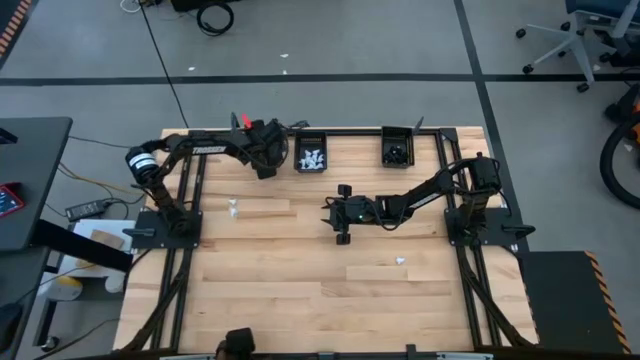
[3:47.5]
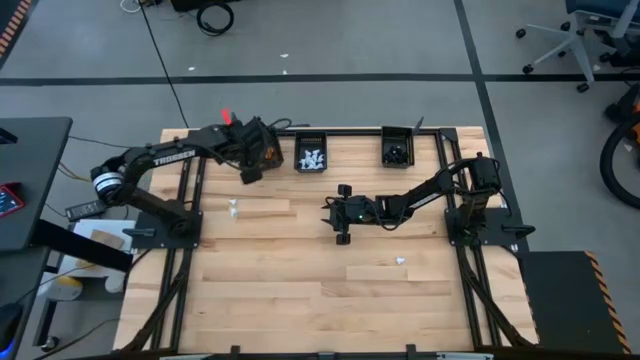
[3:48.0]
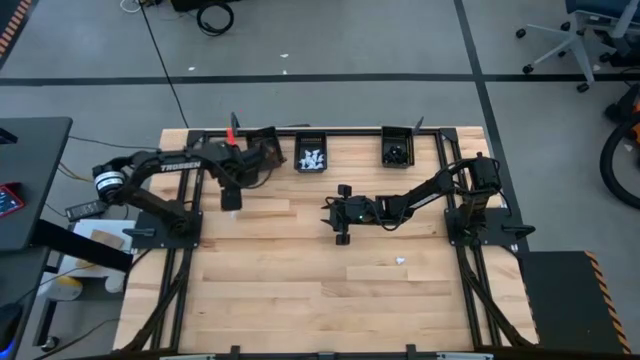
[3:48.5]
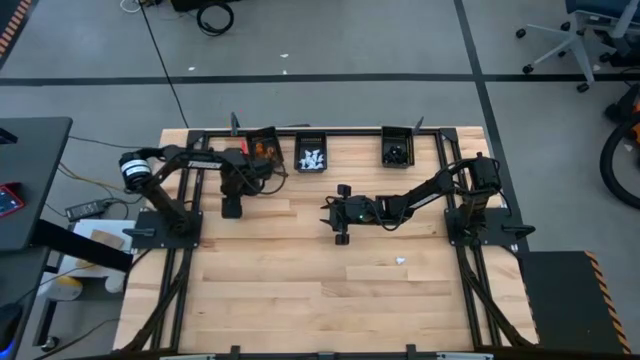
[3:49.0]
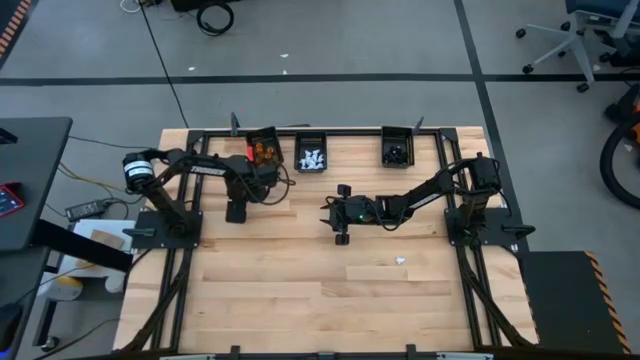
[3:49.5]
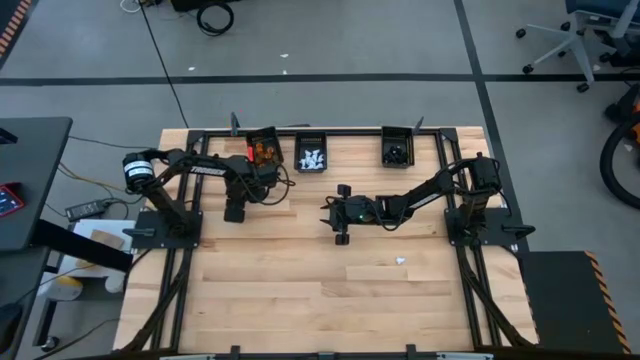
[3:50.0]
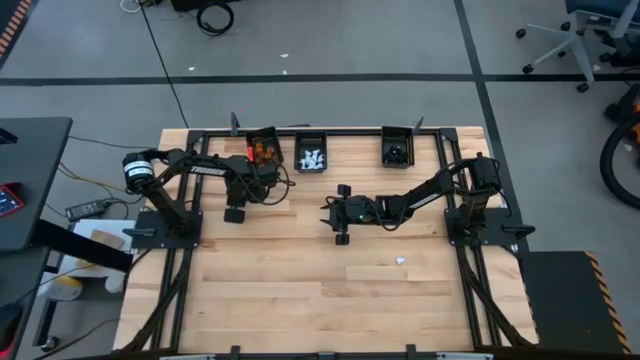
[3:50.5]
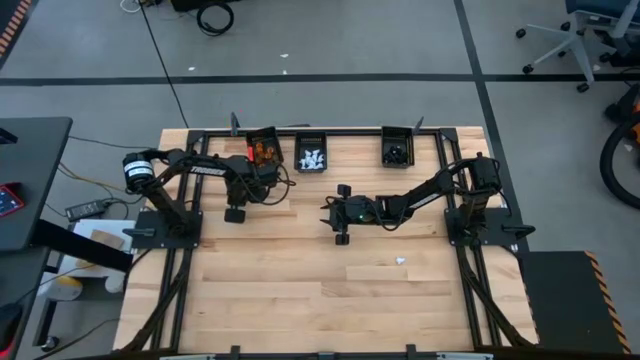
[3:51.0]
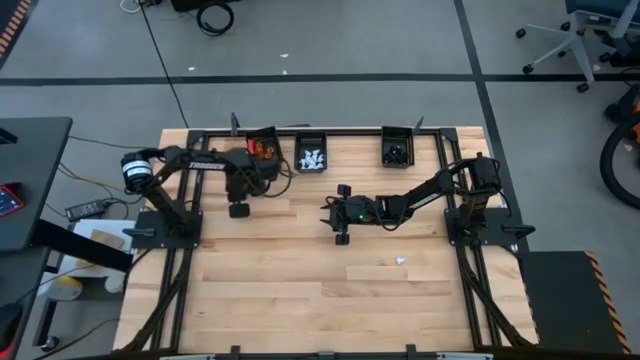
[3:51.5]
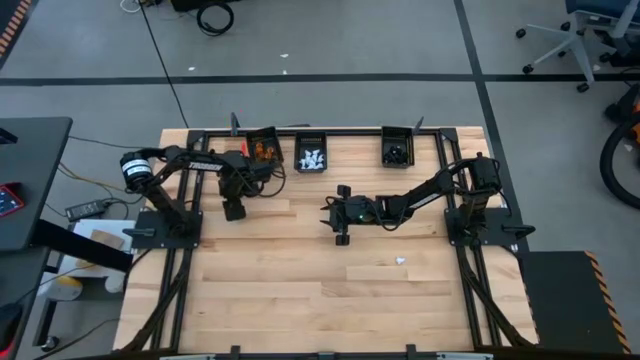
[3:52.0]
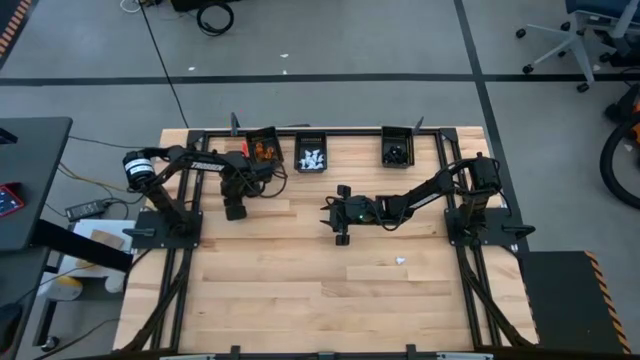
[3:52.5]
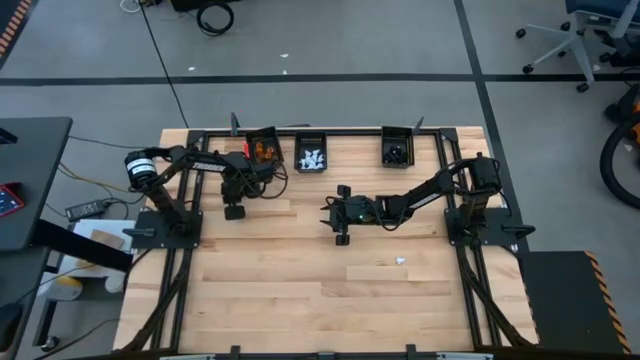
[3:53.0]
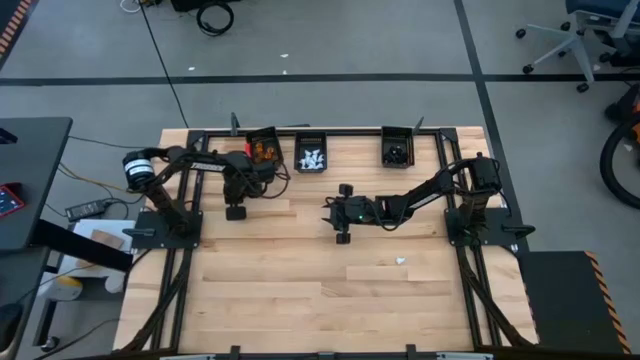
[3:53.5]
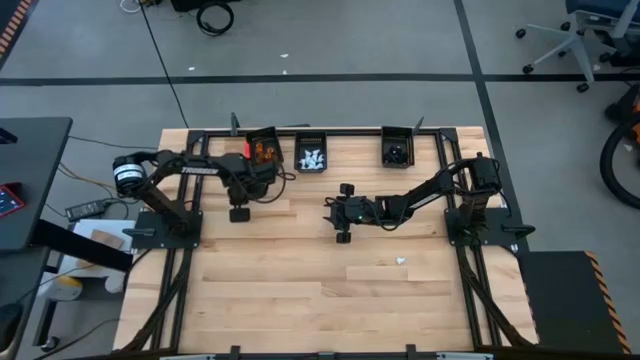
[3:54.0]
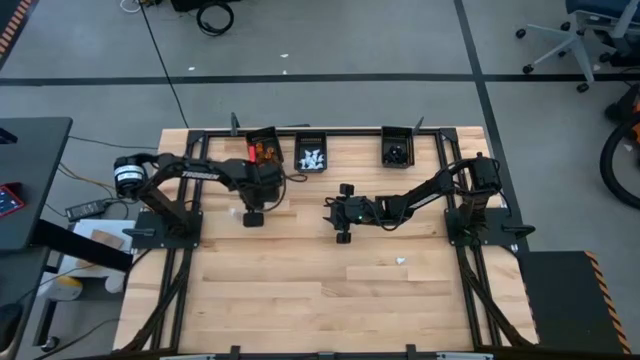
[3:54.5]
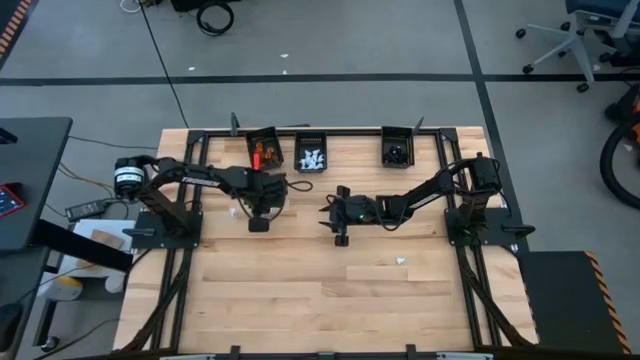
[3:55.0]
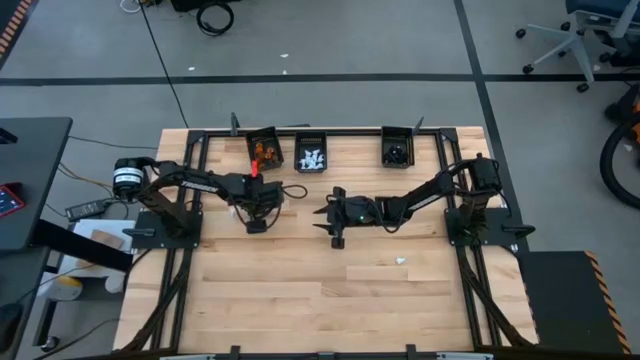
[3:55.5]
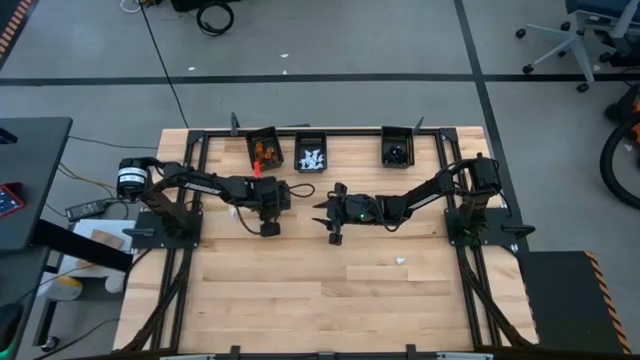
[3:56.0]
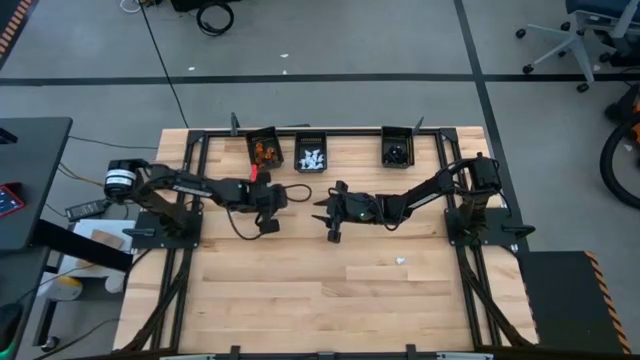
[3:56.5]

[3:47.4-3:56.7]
Task: Sort Halloween decoration
Put the white ghost toy into the middle black bin

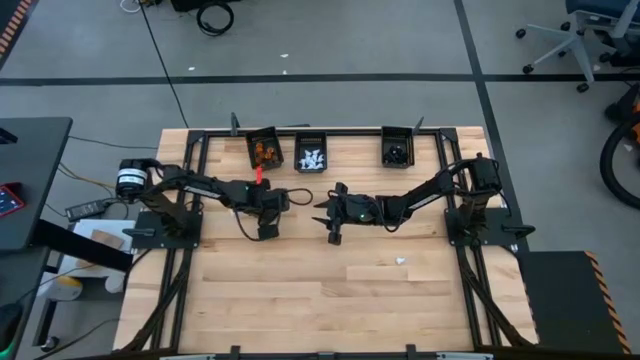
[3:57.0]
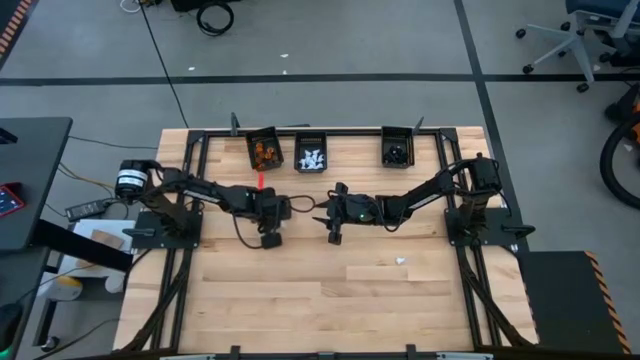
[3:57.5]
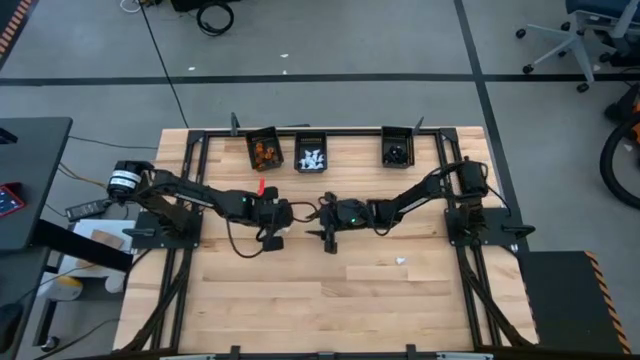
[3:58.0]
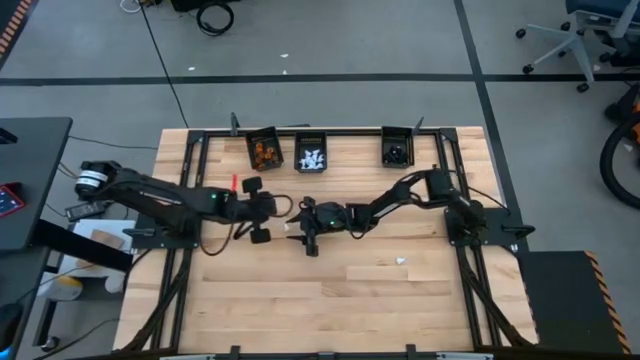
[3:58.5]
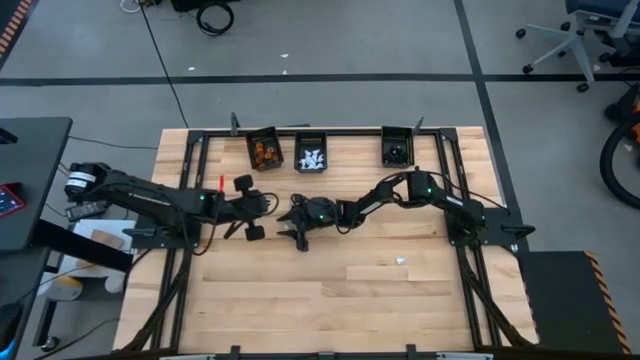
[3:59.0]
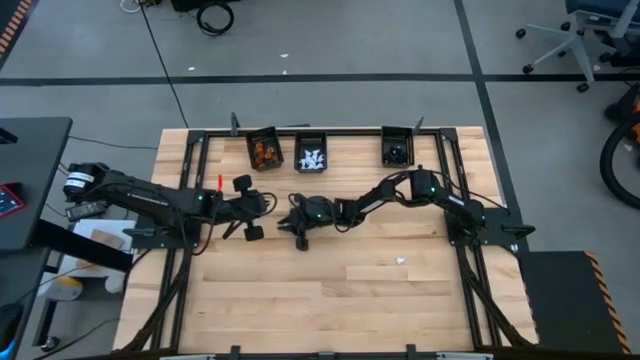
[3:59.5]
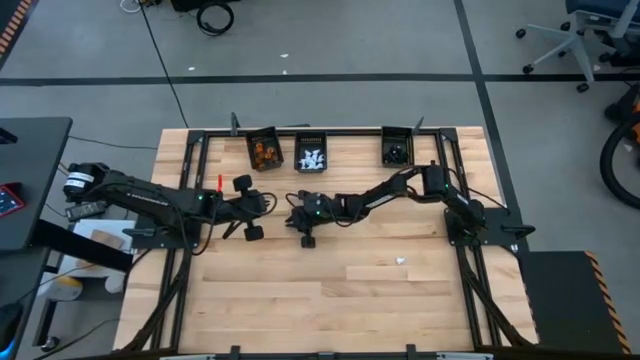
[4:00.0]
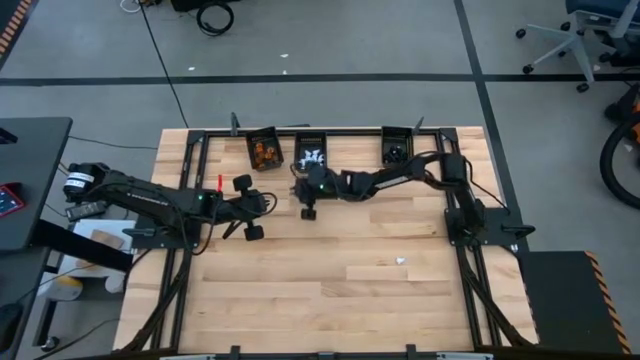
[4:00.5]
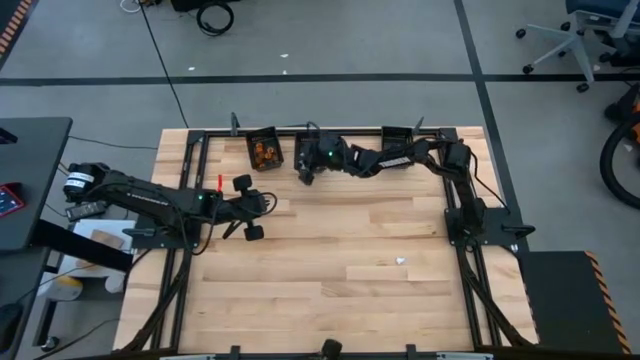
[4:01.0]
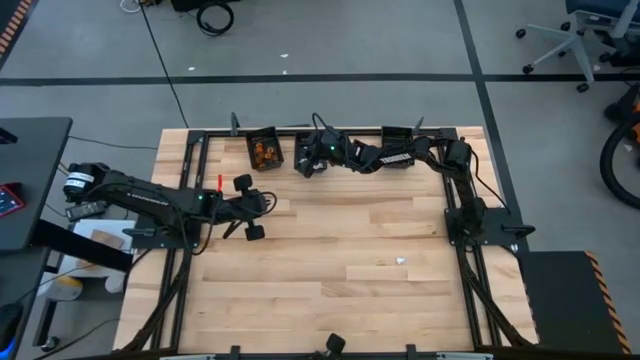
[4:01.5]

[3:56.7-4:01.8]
Put the white ghost toy into the middle black bin

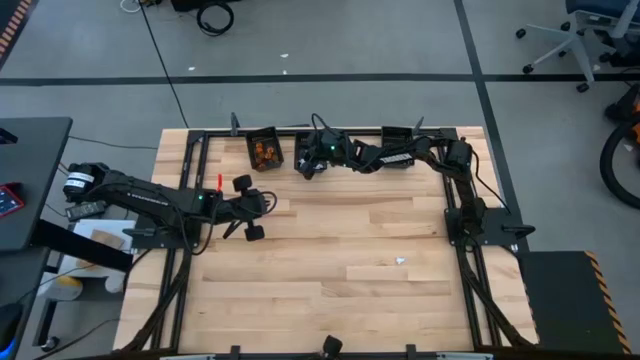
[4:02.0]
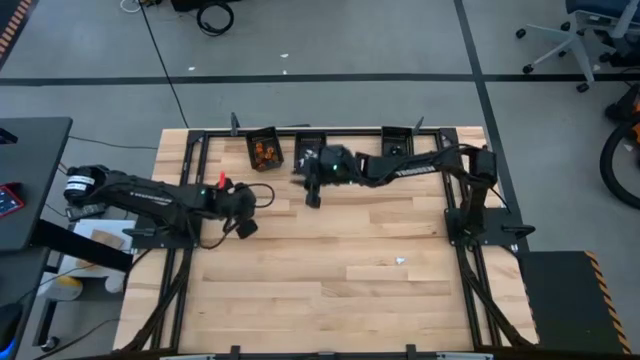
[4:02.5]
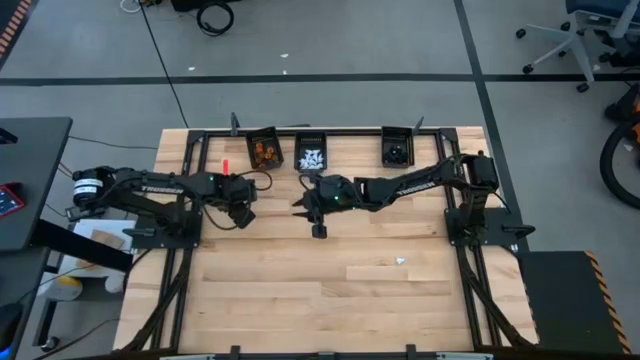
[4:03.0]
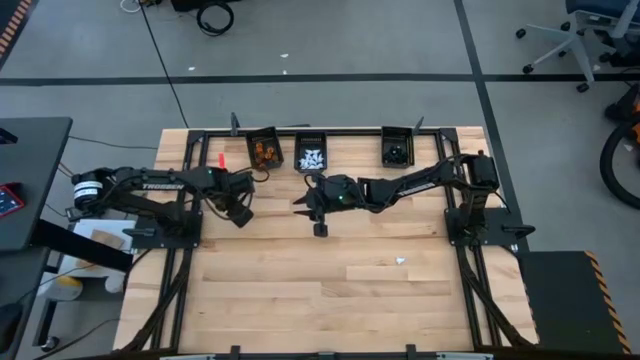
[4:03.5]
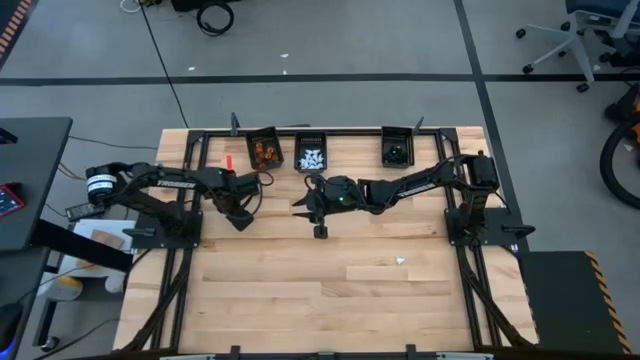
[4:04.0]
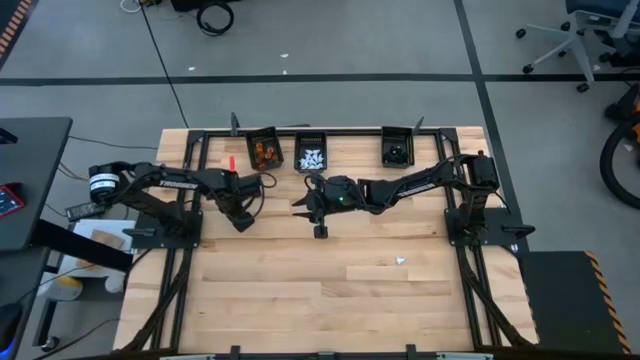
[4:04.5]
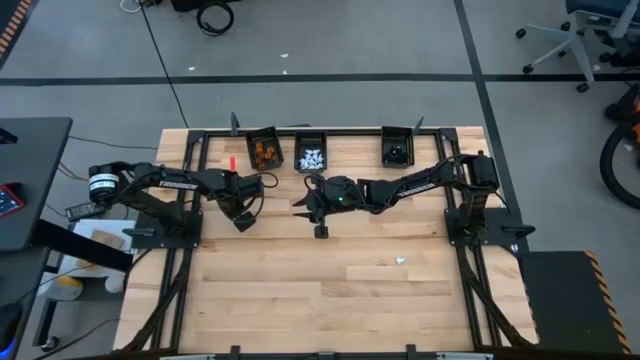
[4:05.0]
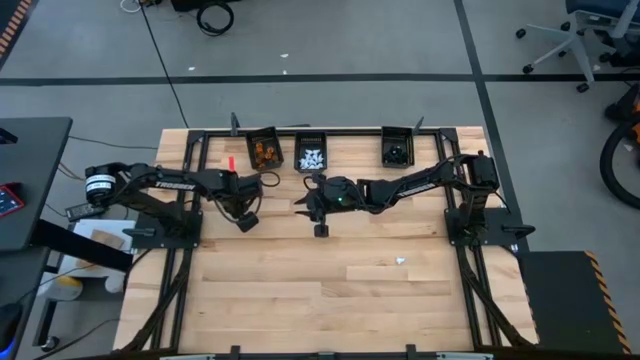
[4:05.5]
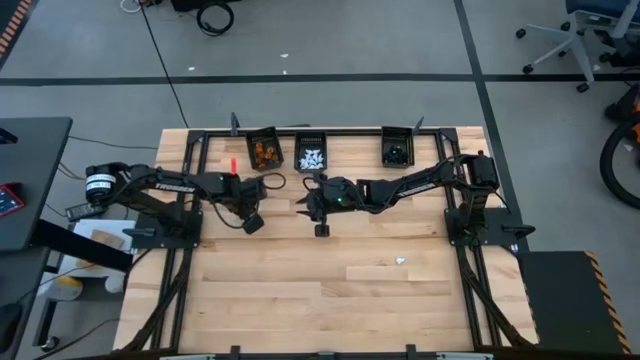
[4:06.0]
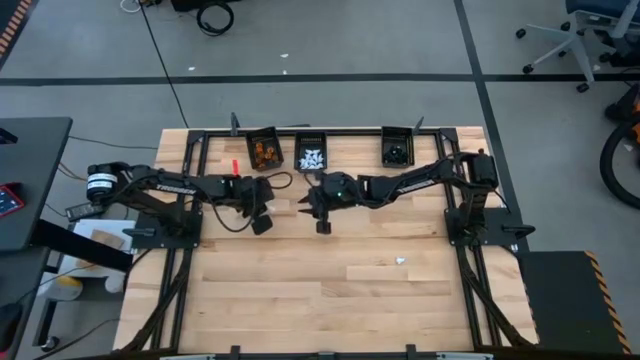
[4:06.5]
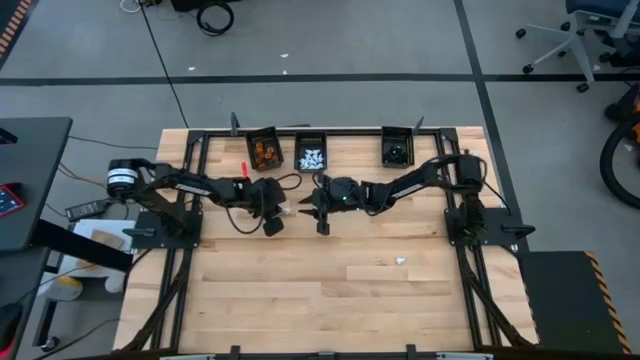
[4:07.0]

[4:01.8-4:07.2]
Put the white ghost toy into the middle black bin

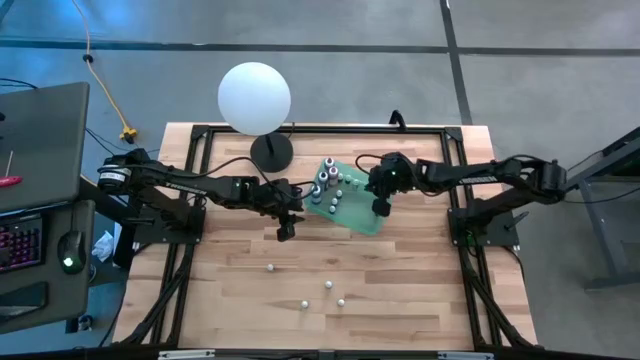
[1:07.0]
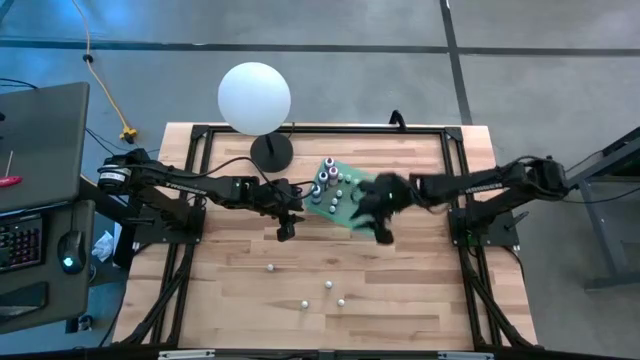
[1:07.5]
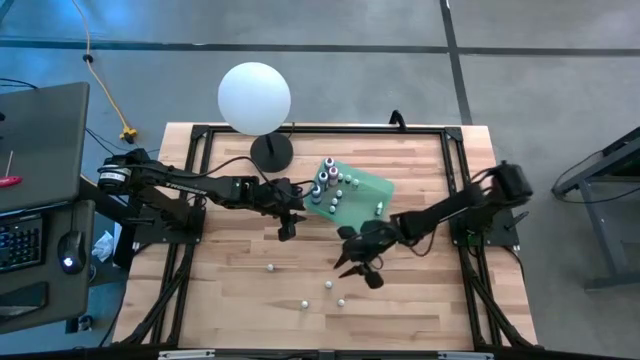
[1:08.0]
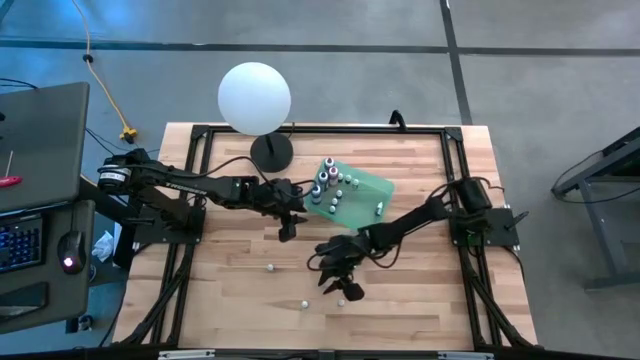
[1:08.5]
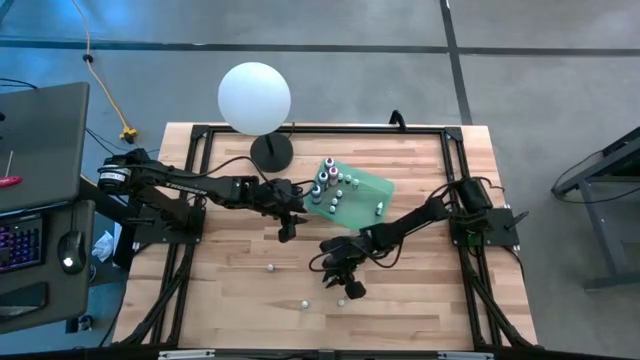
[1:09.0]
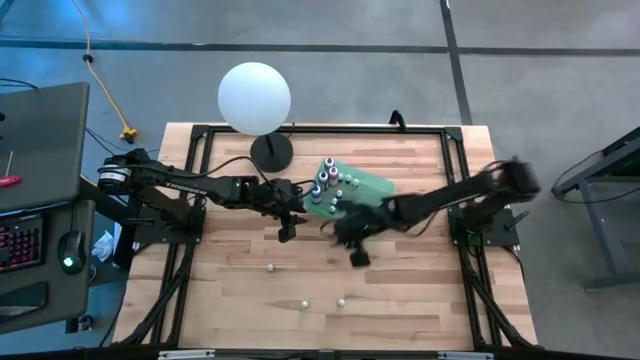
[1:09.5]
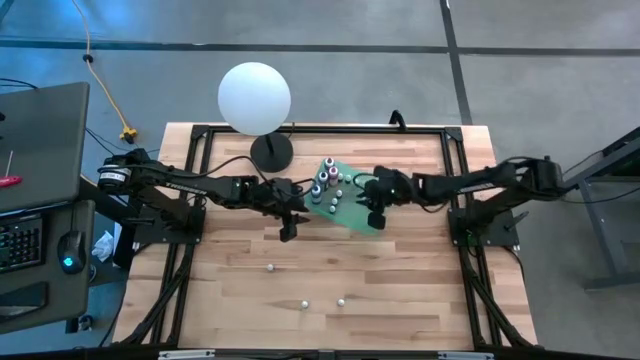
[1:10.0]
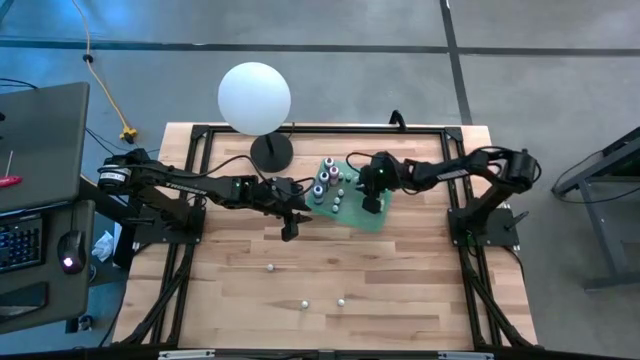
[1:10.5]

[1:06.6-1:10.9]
Task: Pick & Place food coloring
Put the small purple food coloring bottle into the green container
